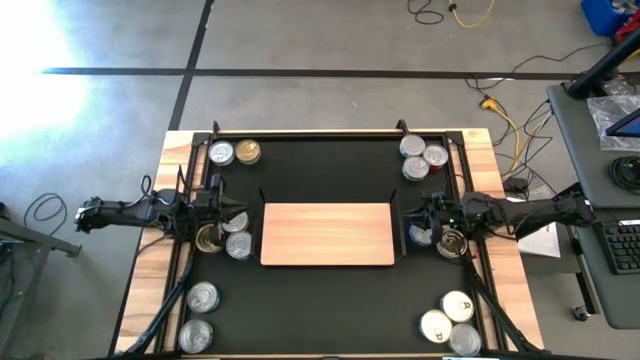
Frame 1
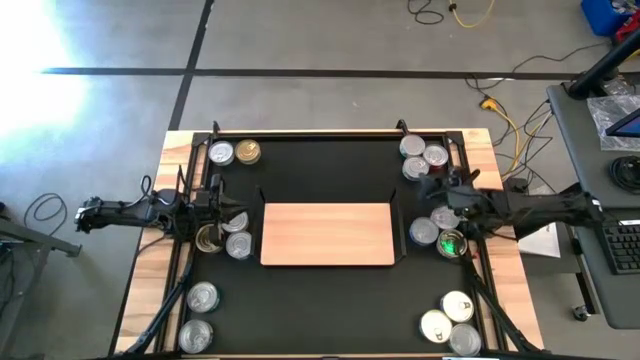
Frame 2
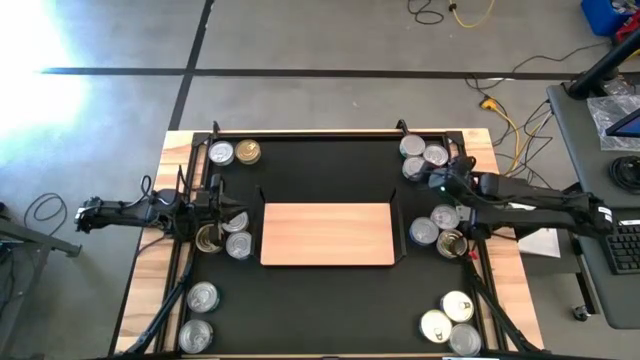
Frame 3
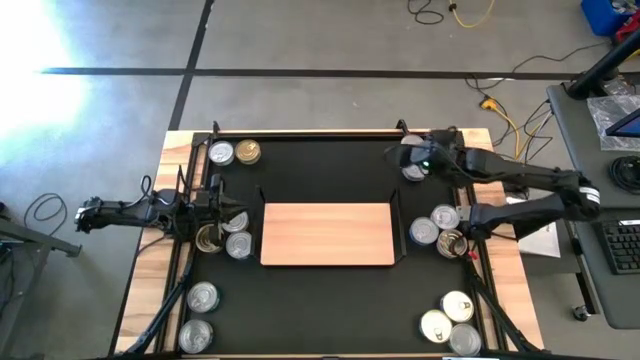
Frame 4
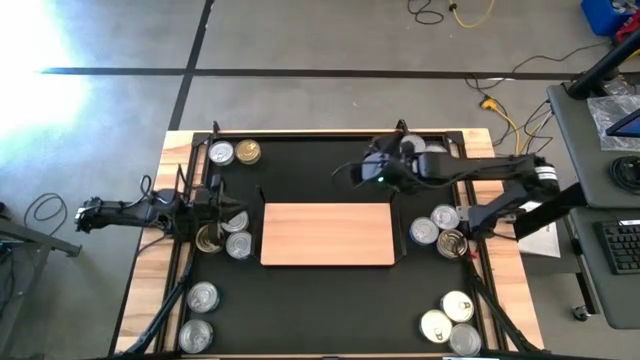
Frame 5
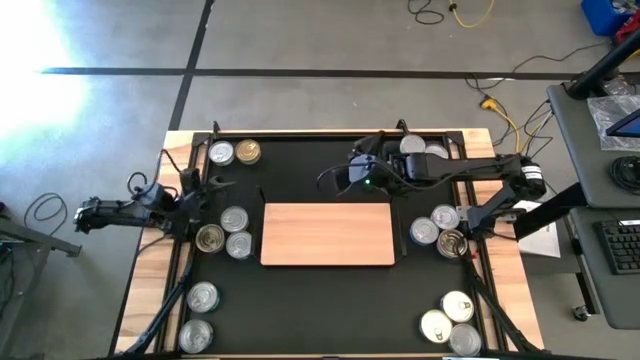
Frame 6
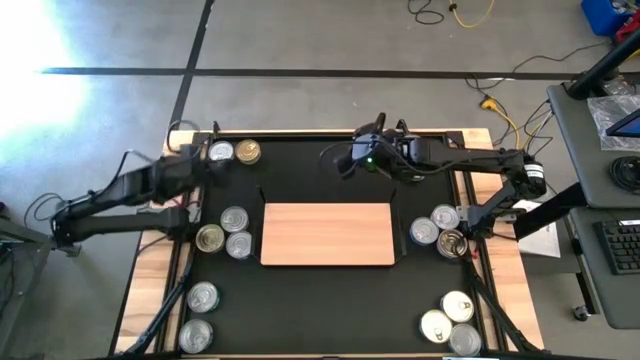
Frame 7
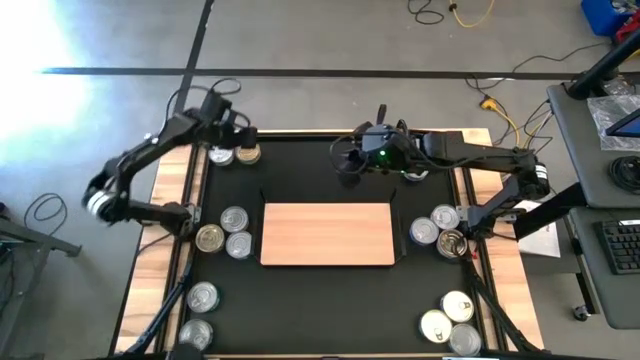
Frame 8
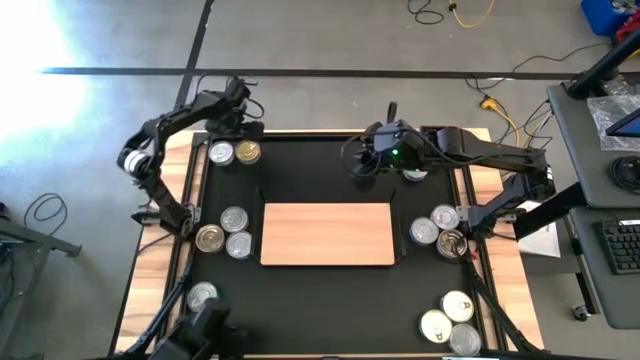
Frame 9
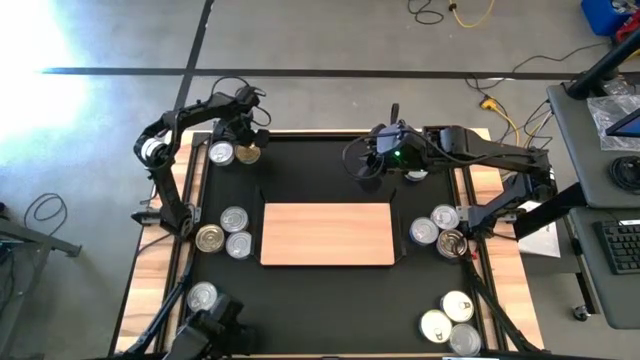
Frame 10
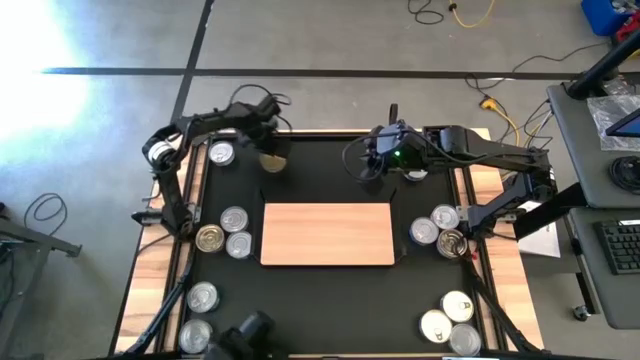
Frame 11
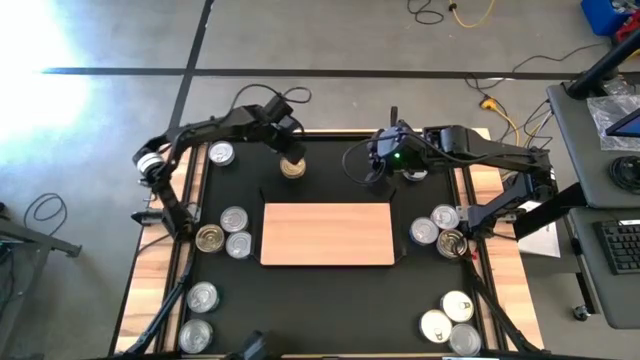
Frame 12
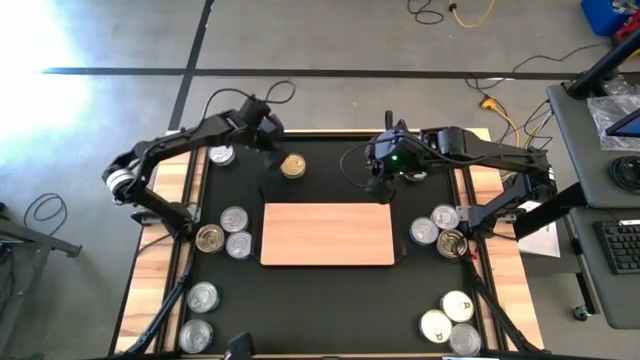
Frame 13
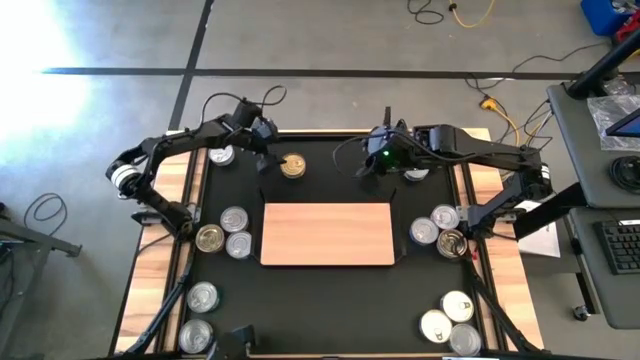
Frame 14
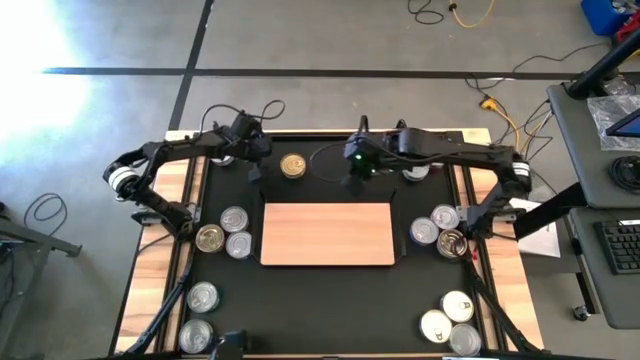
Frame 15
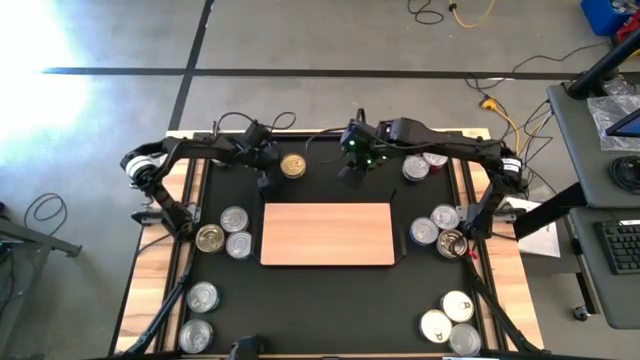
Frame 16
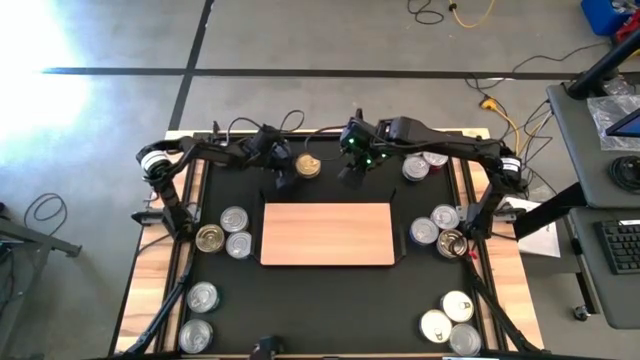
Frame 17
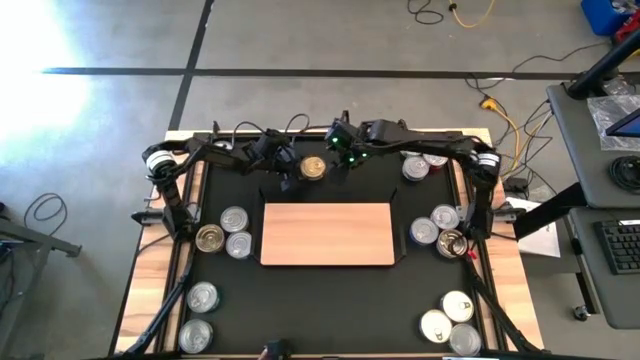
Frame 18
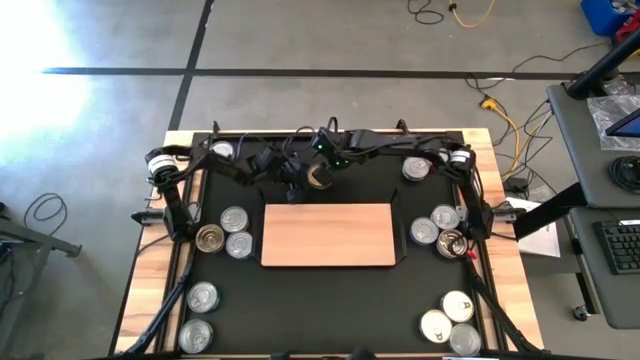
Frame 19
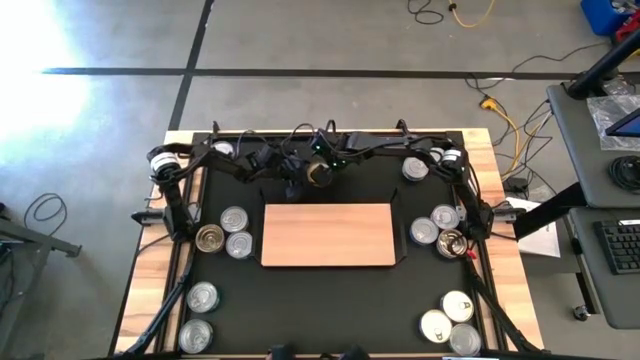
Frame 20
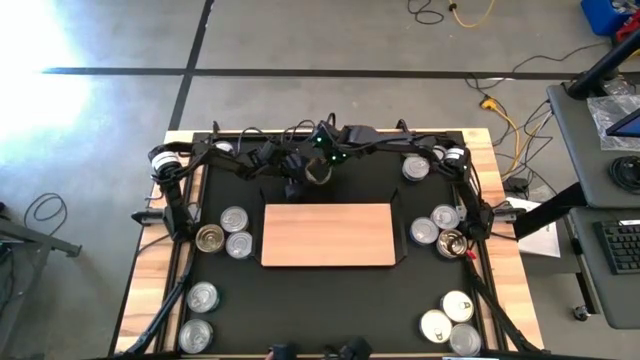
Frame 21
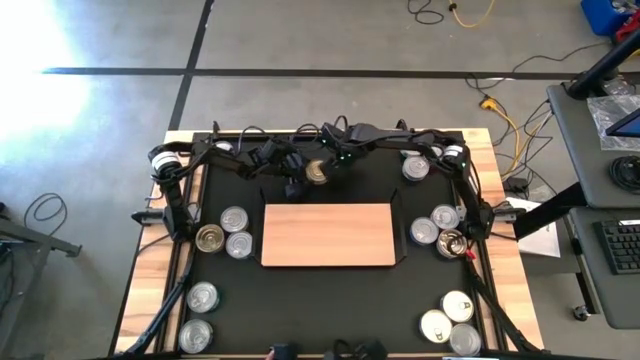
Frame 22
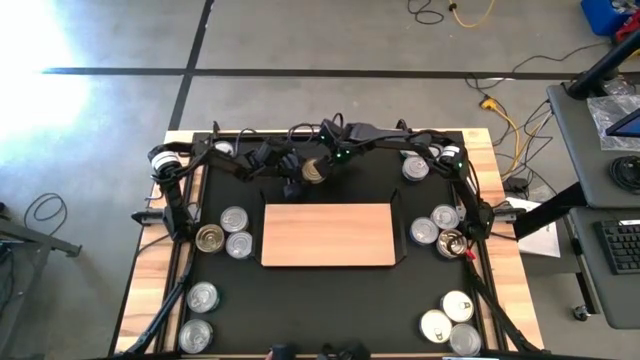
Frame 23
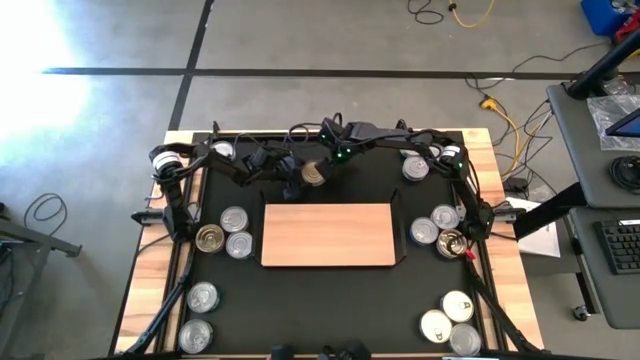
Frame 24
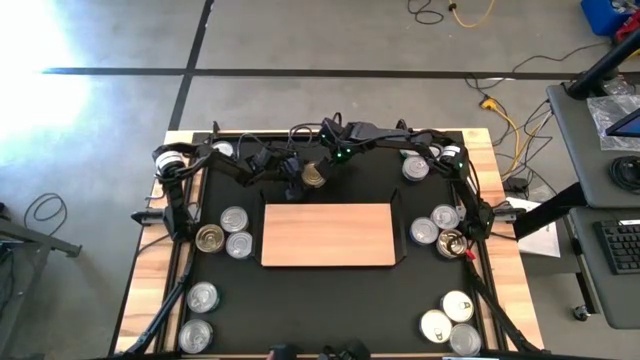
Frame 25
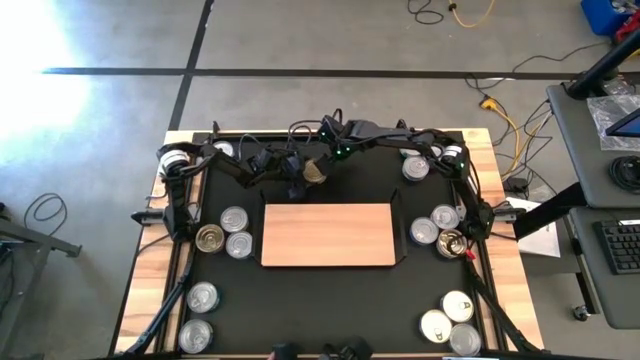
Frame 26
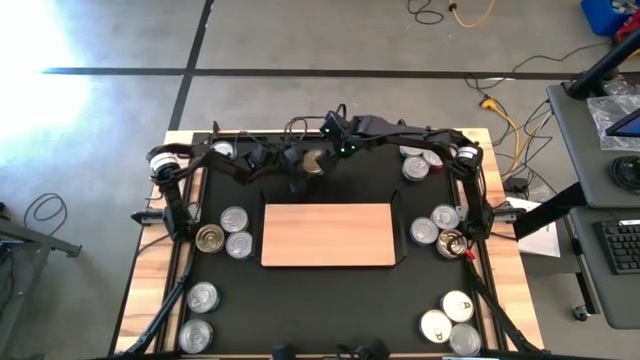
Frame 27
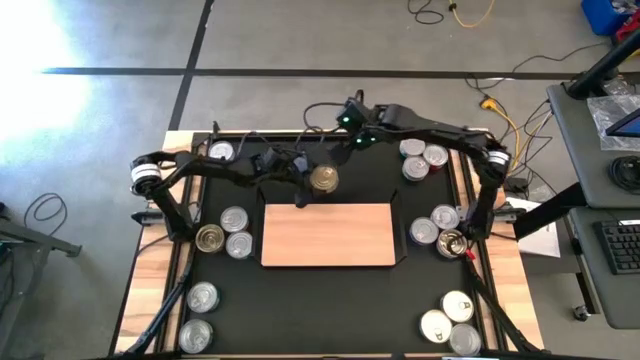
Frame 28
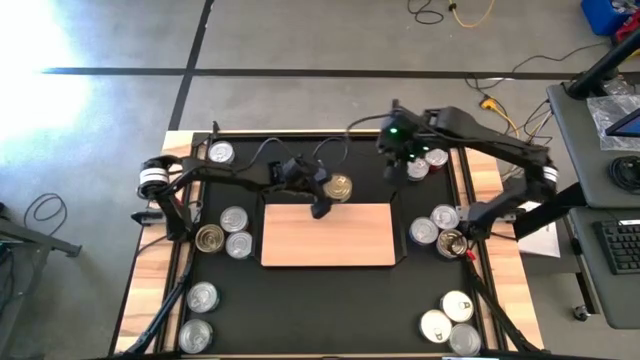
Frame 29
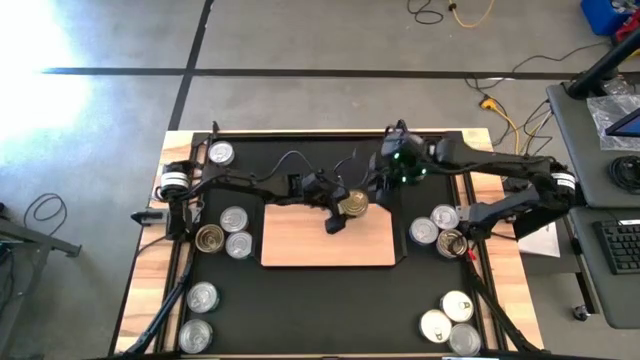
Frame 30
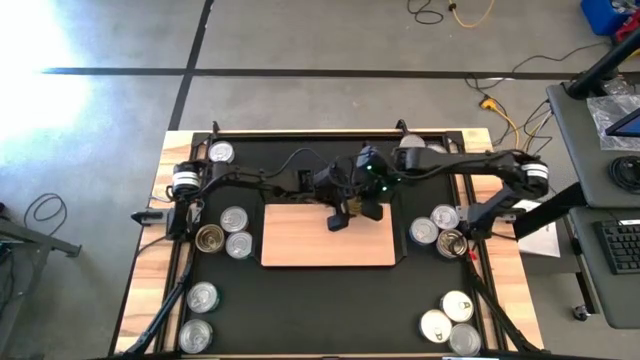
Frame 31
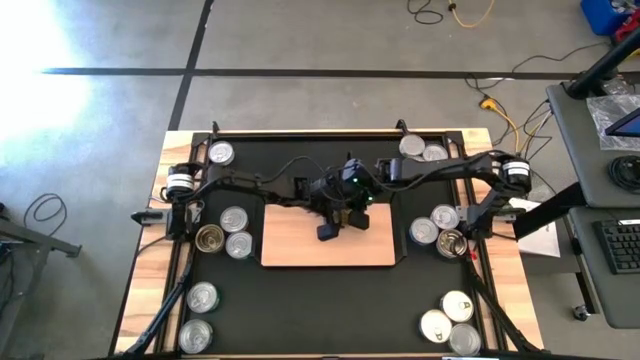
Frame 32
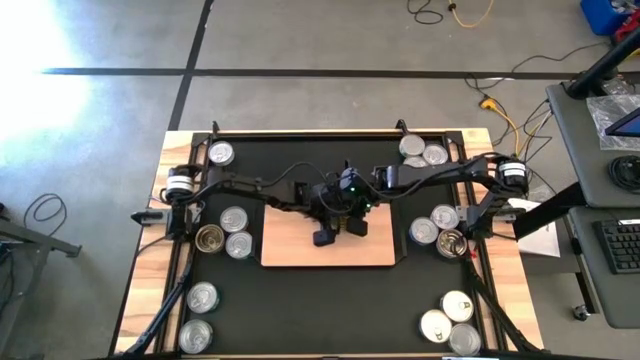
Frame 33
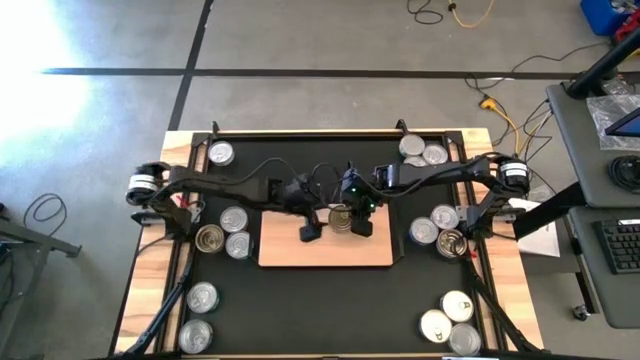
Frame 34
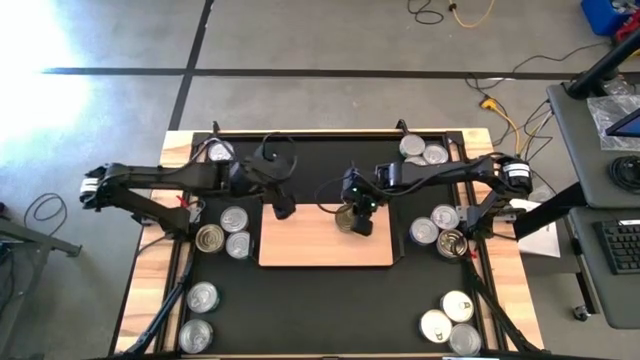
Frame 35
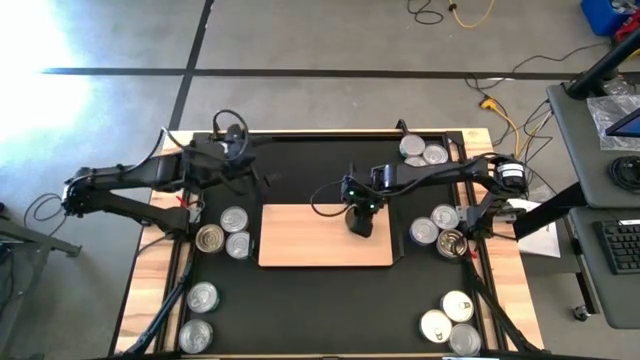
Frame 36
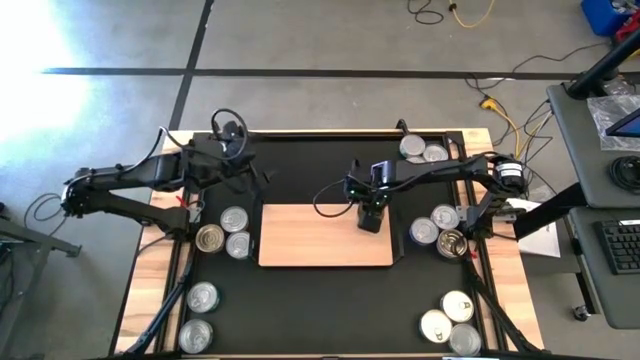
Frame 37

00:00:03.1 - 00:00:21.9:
Task: Stack canned seafood by type on shelf
Put the top left green tuna can on the shelf
